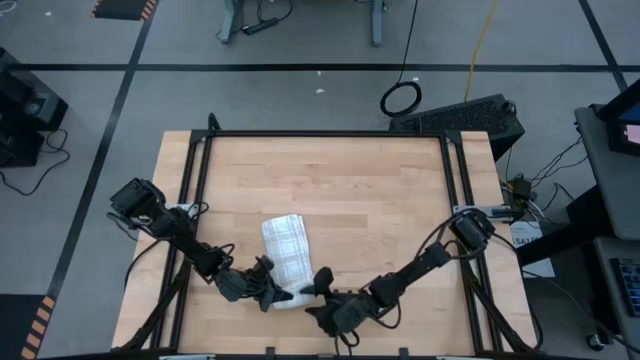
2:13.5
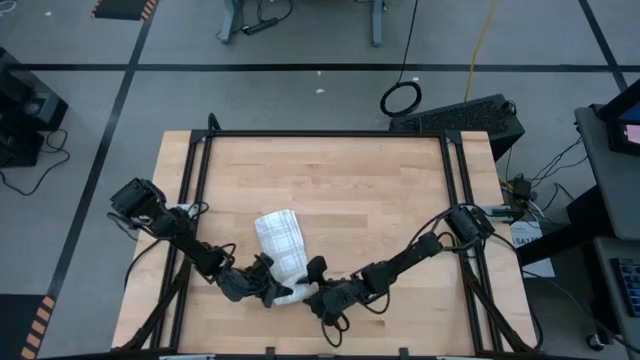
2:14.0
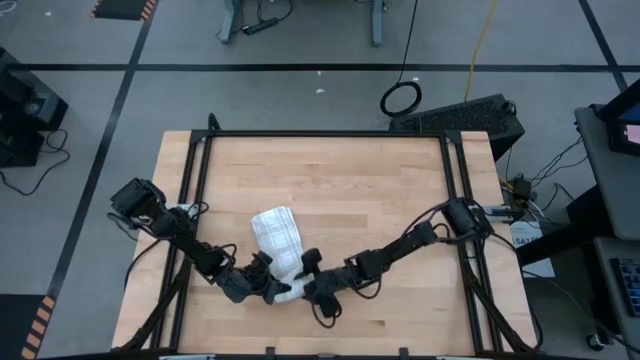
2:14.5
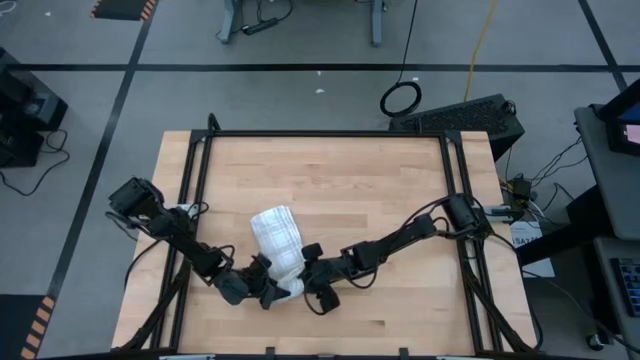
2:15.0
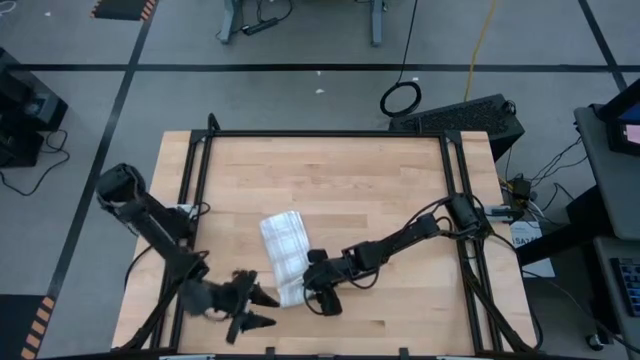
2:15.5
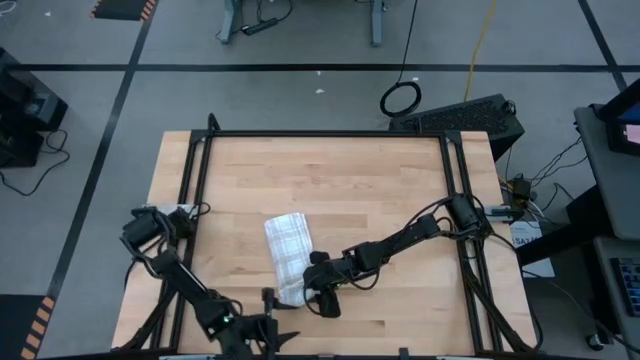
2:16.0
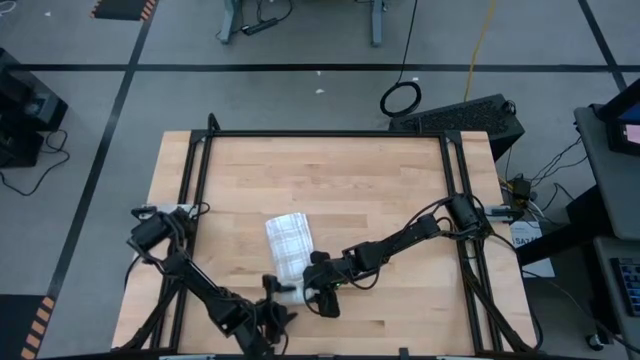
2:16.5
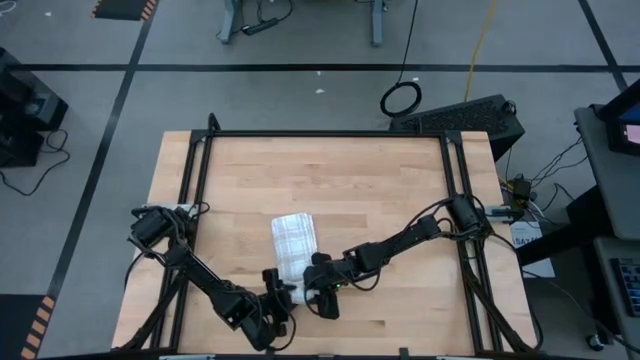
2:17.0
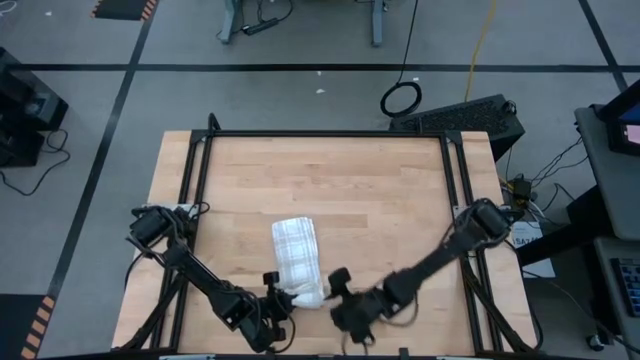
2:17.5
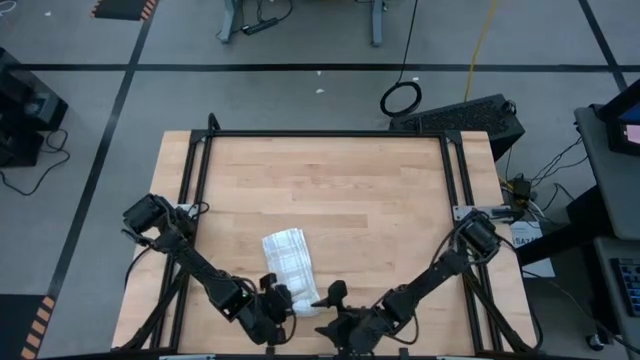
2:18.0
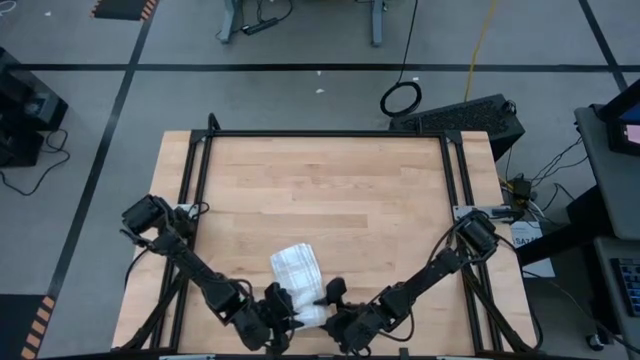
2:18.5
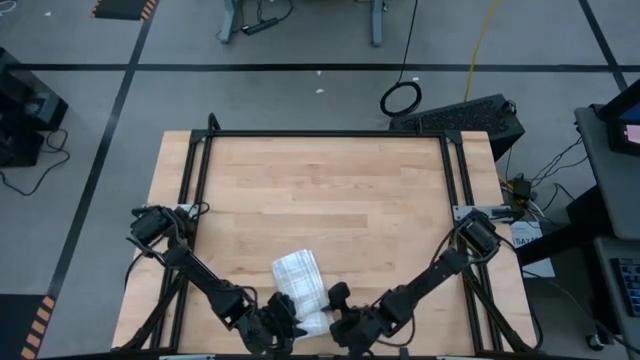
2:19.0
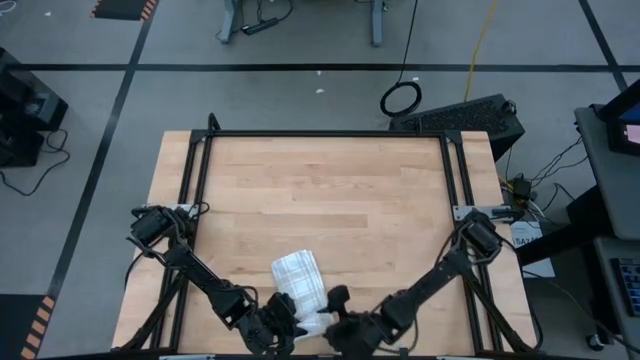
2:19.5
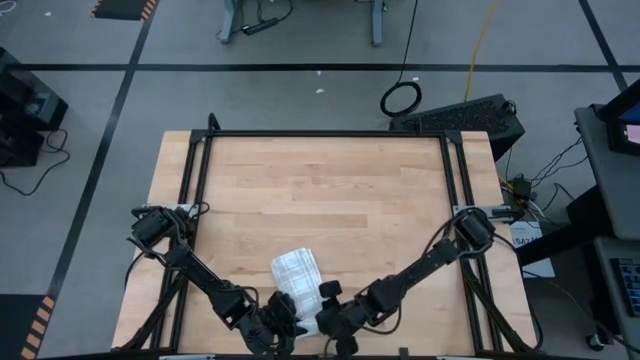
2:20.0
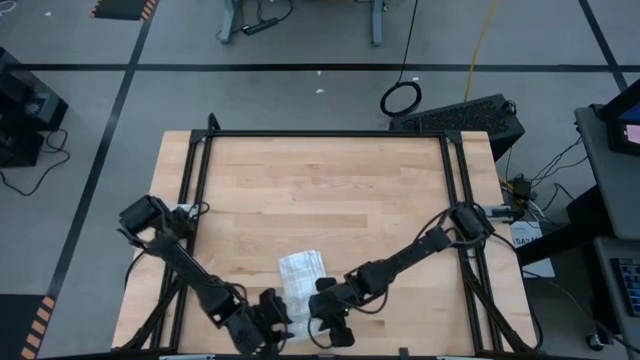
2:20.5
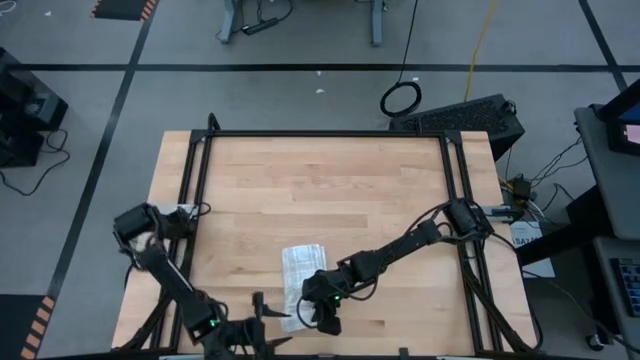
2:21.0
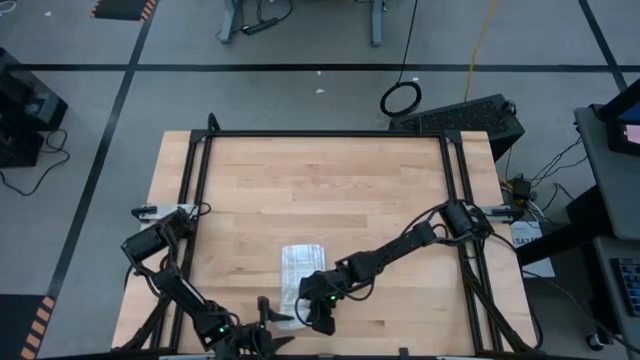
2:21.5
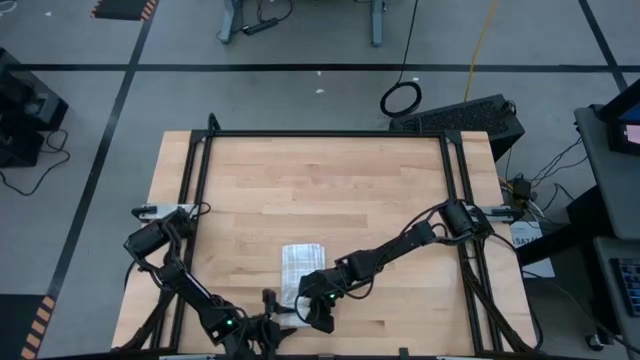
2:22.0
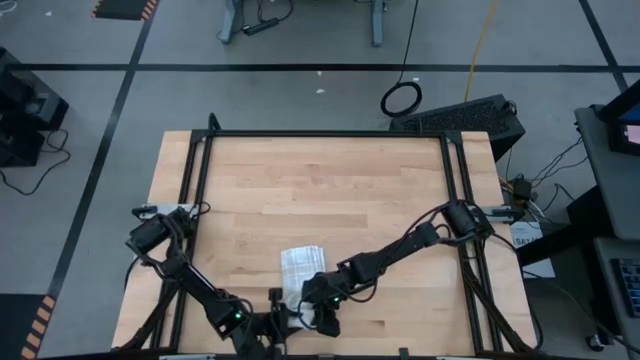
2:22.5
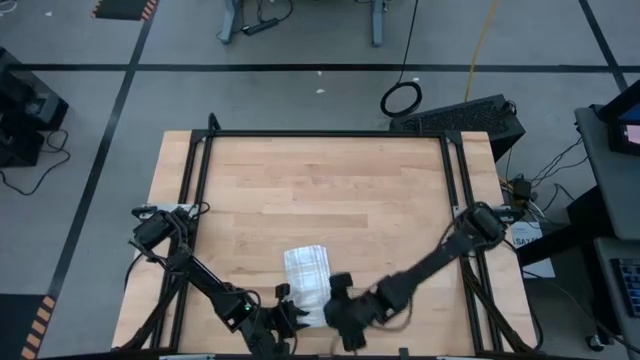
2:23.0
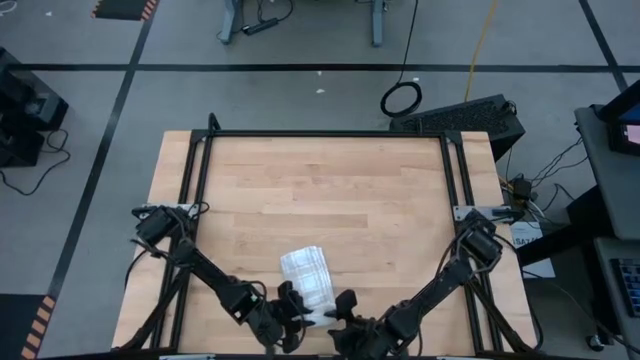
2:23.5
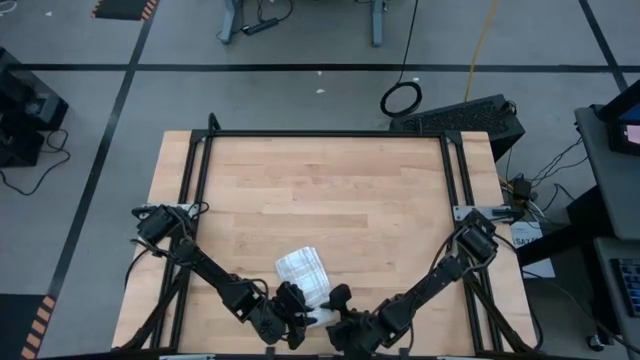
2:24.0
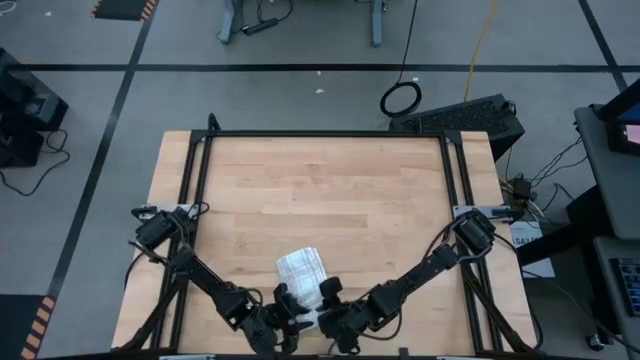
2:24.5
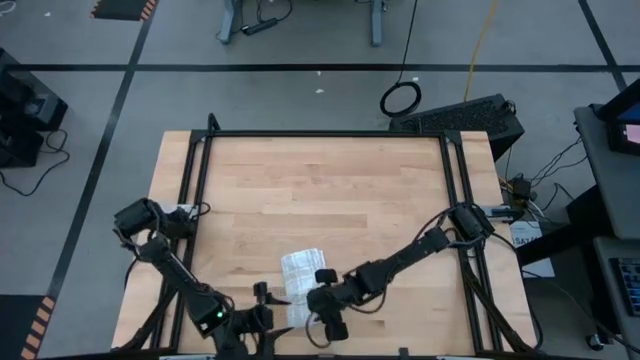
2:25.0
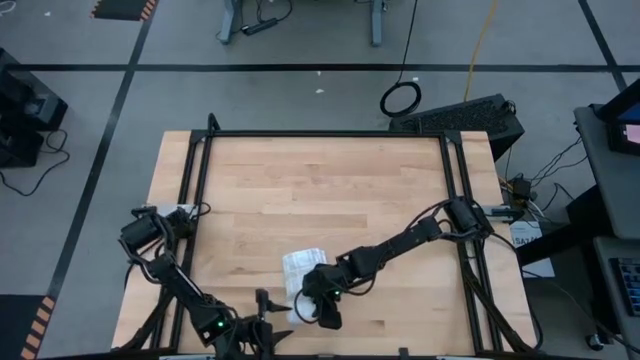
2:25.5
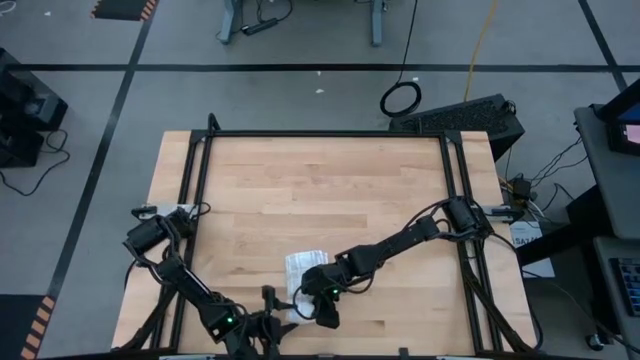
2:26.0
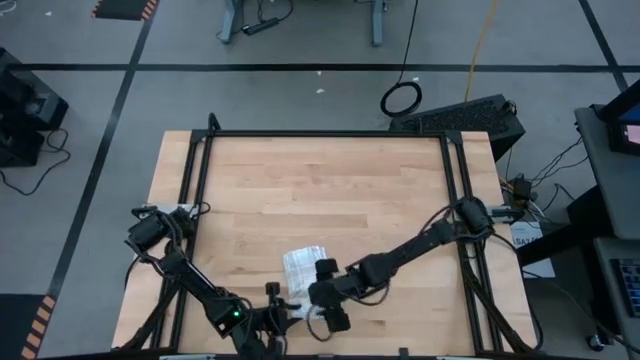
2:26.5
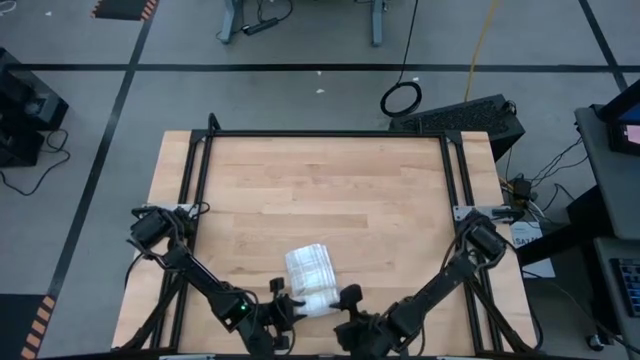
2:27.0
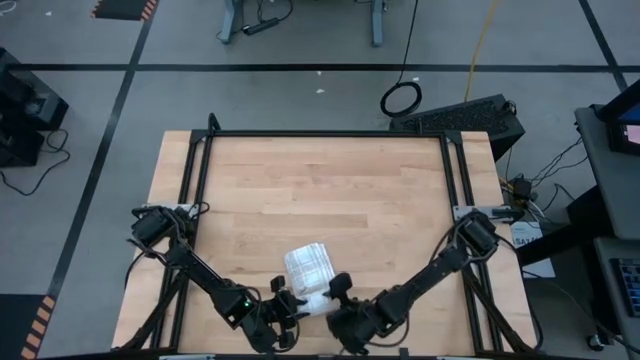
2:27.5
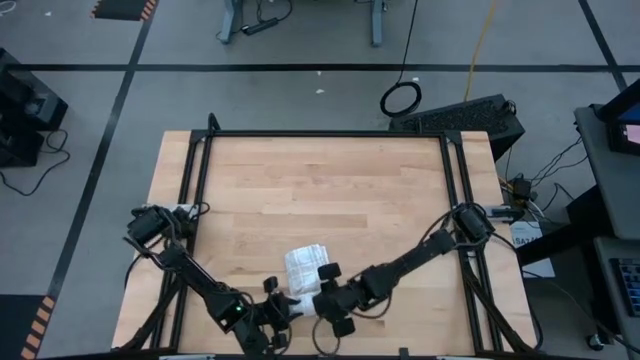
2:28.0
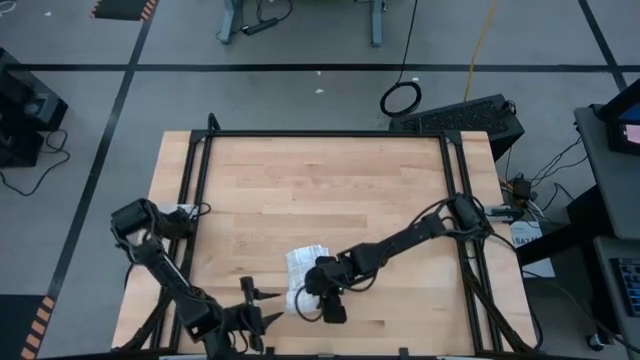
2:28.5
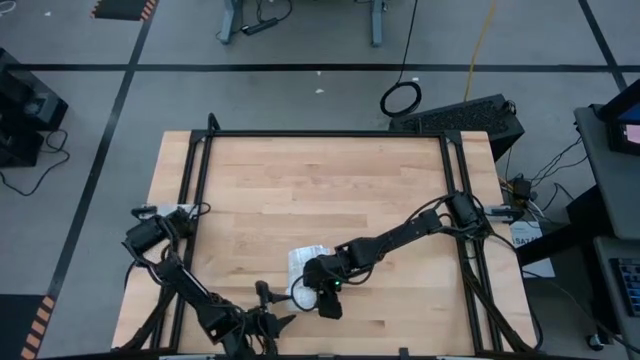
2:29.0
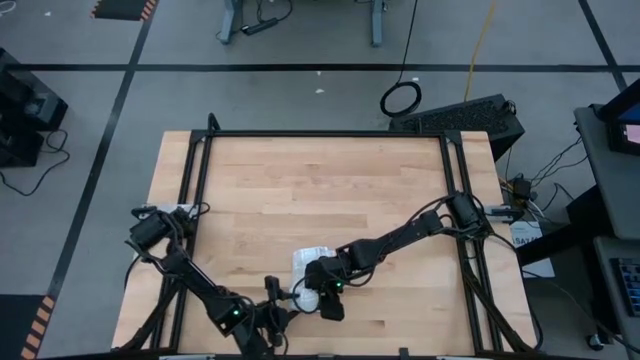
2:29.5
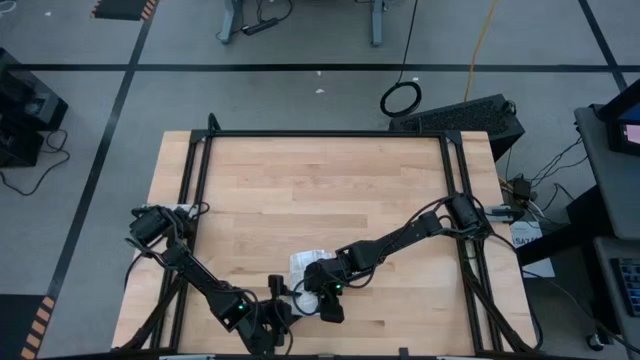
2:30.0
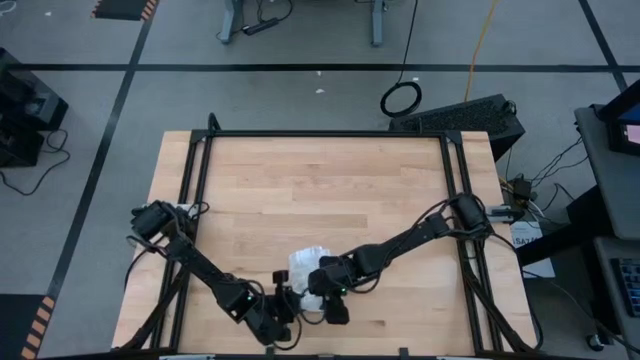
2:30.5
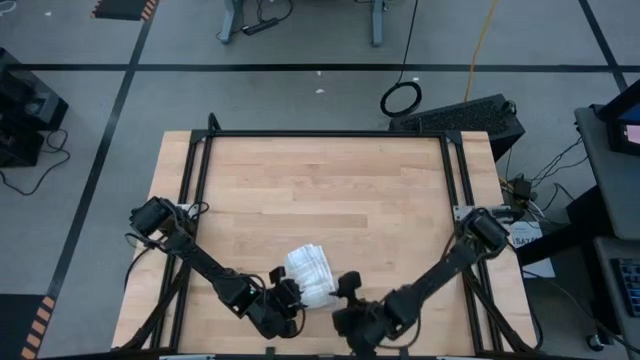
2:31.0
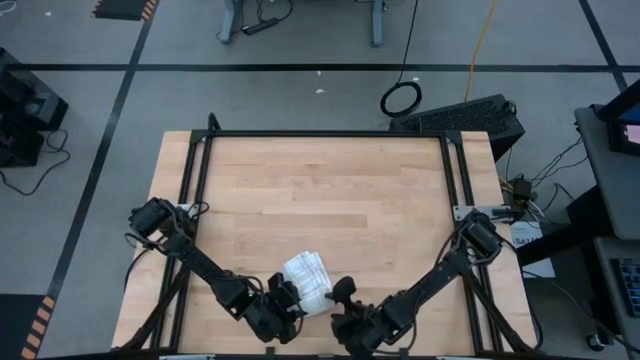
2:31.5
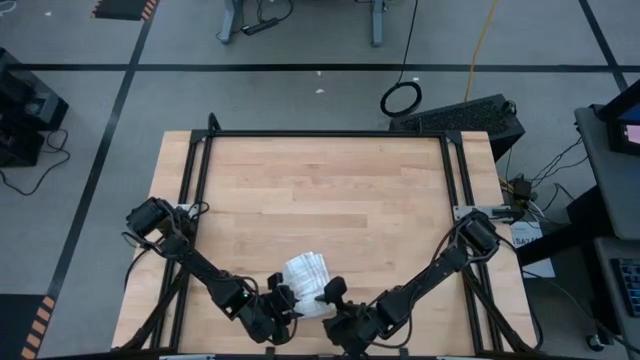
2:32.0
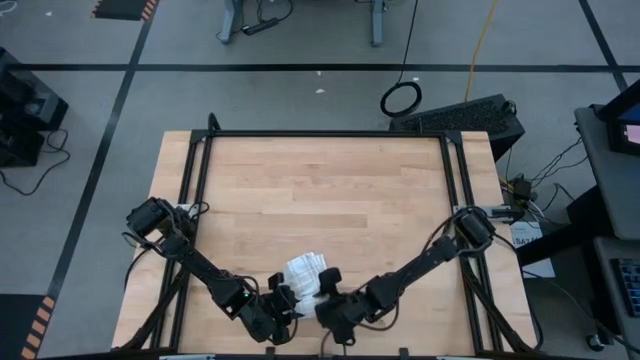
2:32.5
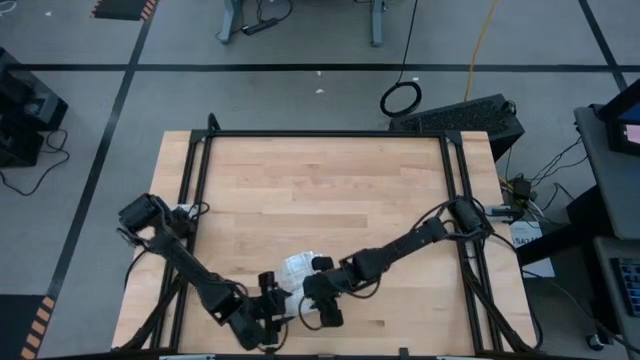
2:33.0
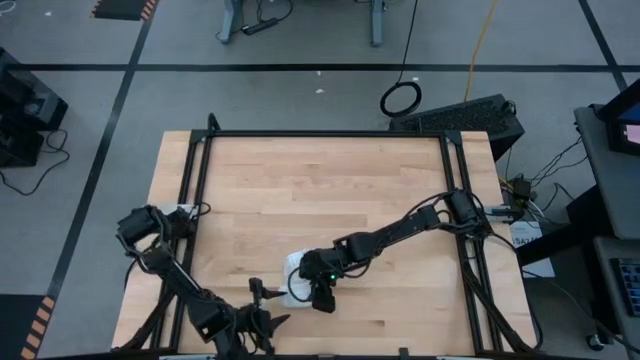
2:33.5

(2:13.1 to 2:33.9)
Task: Roll towel
Roll the brown checkered towel

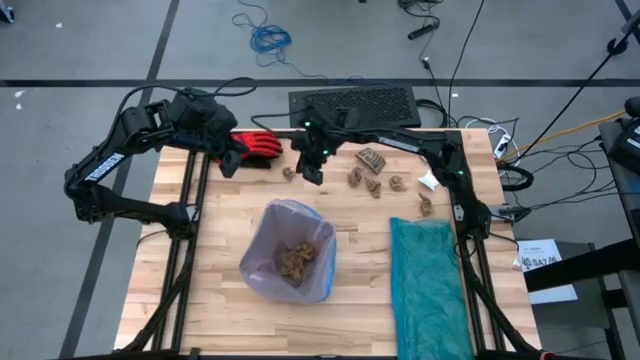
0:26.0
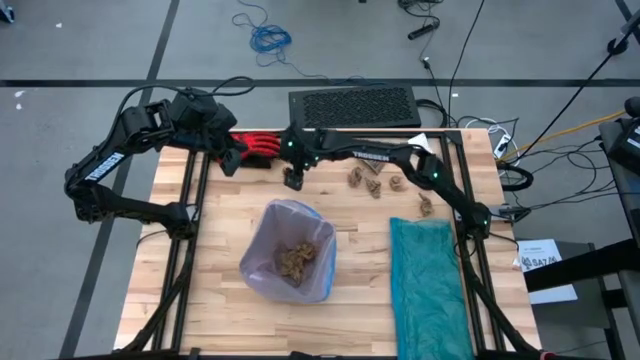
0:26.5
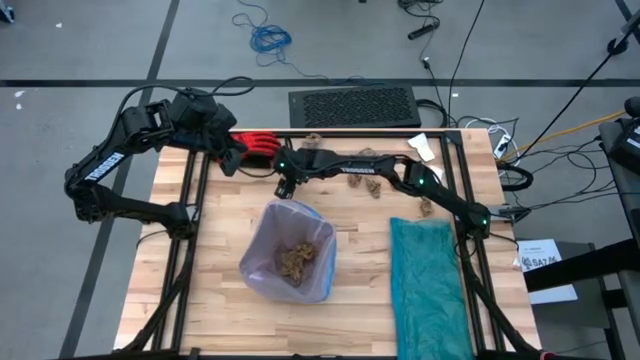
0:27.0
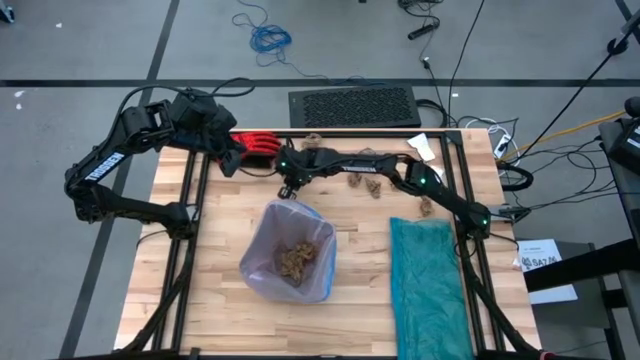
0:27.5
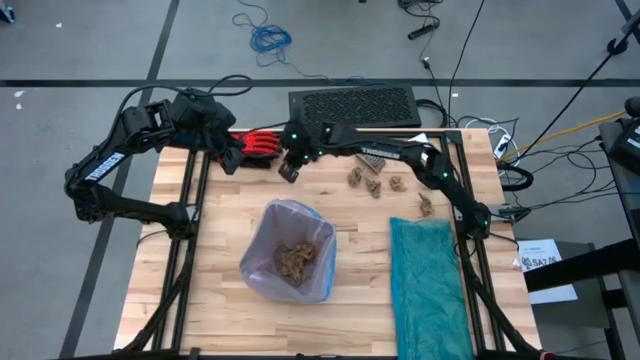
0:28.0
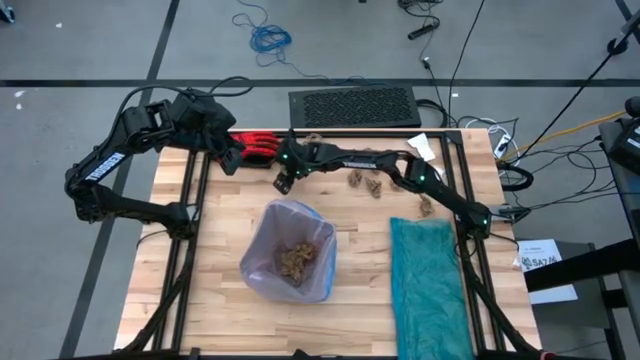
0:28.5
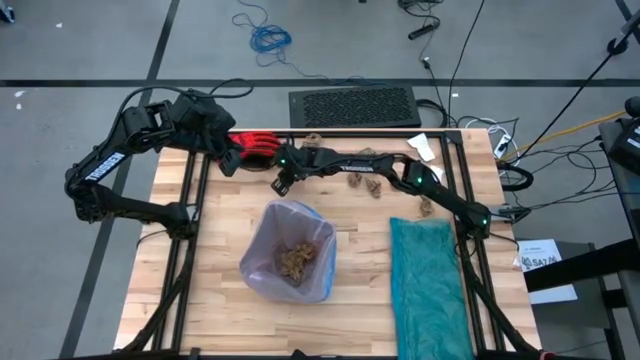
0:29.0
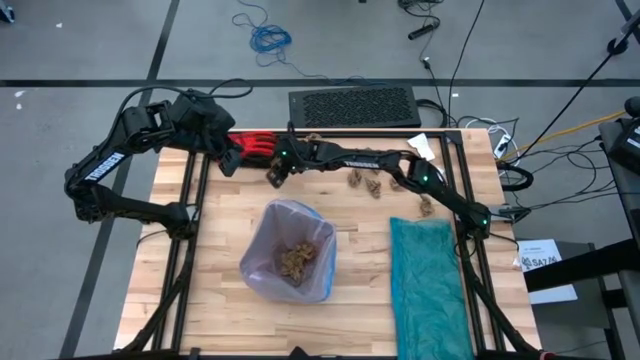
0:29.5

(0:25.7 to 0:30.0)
Task: place trash/remove bag and relplace
Put the brown napkin into the trash bin
